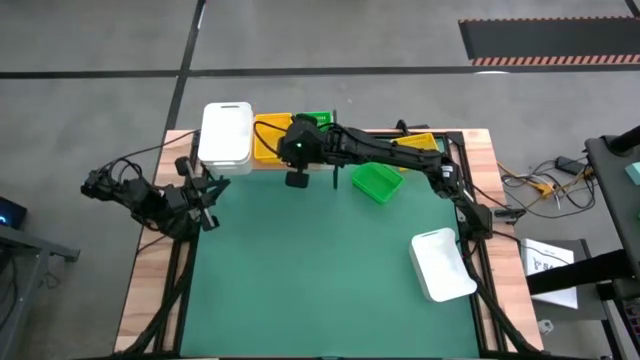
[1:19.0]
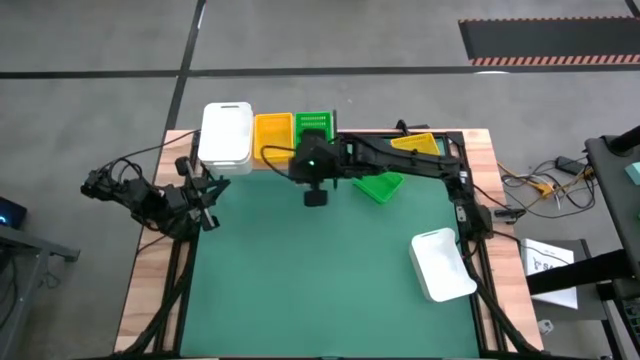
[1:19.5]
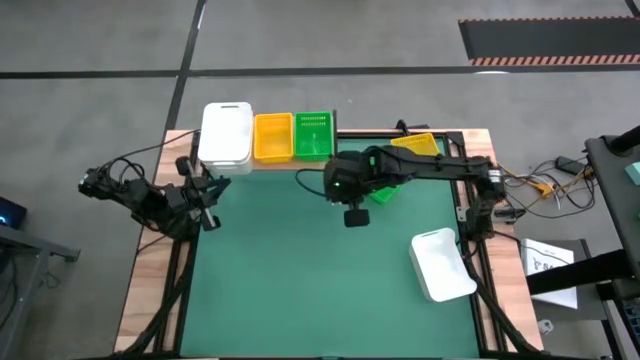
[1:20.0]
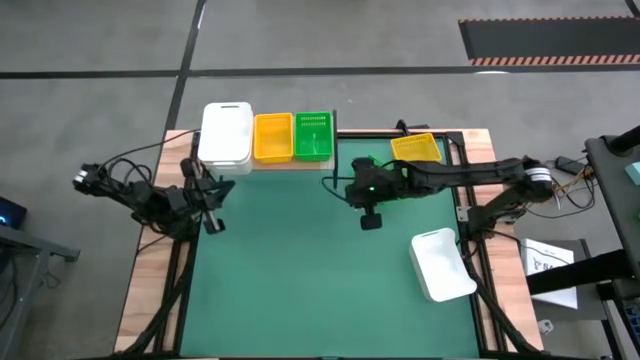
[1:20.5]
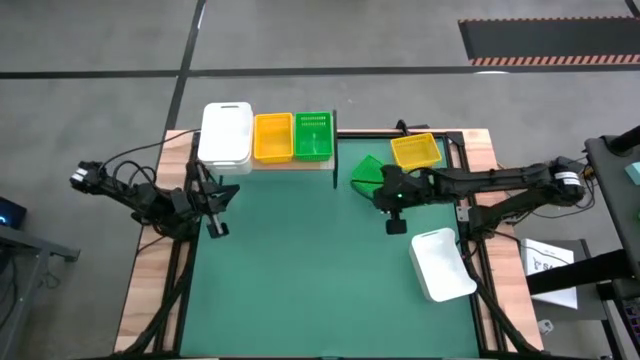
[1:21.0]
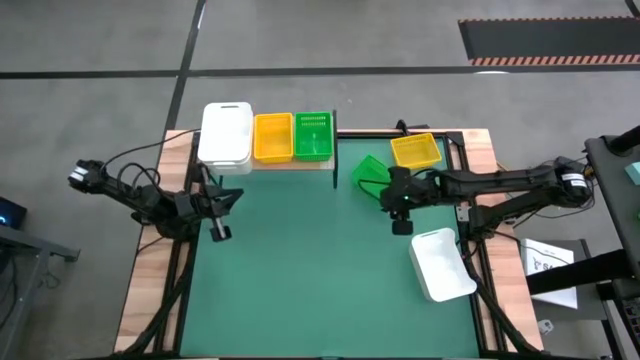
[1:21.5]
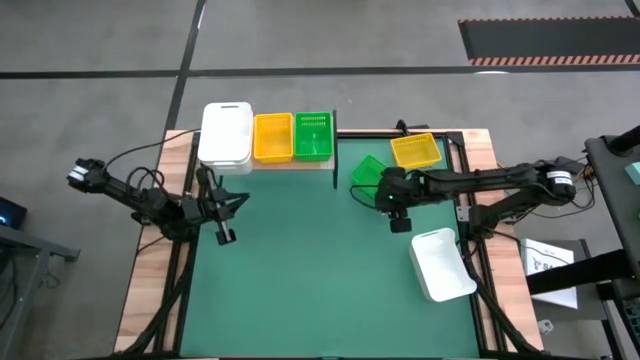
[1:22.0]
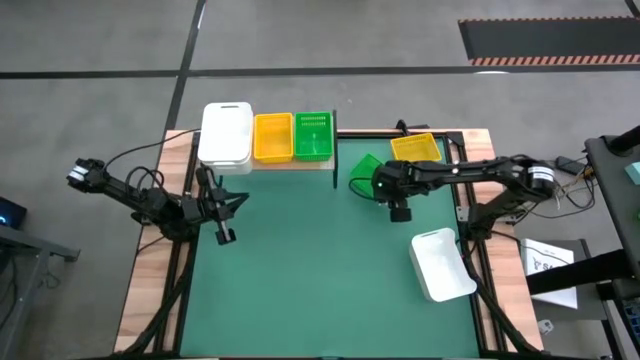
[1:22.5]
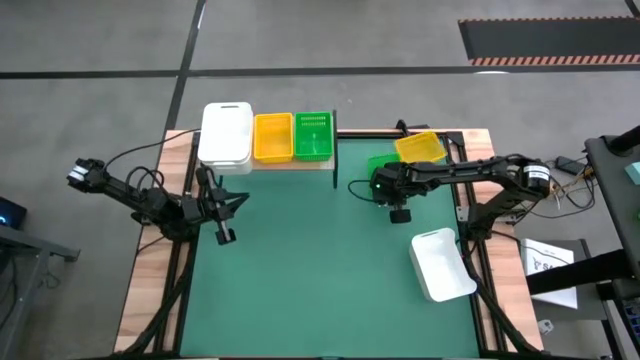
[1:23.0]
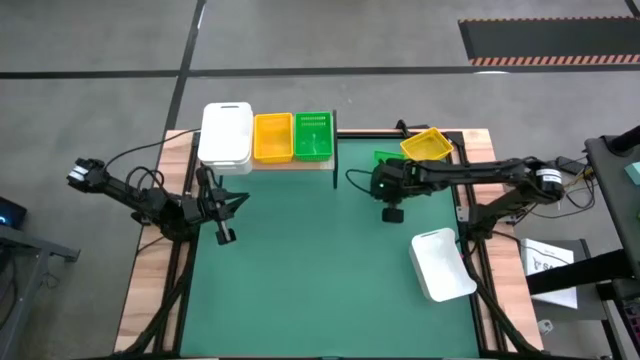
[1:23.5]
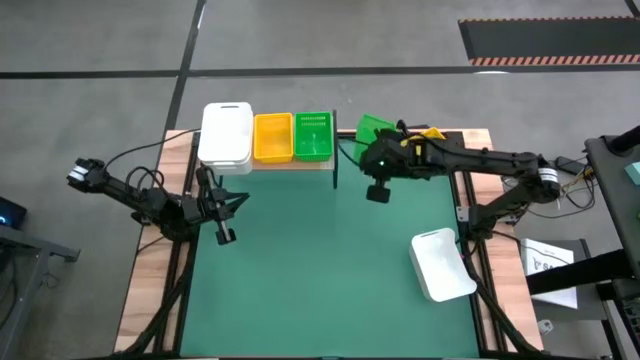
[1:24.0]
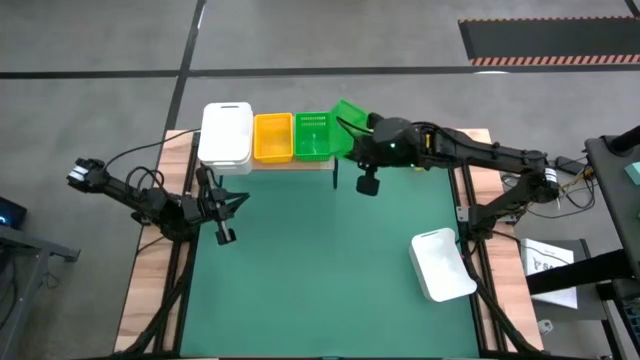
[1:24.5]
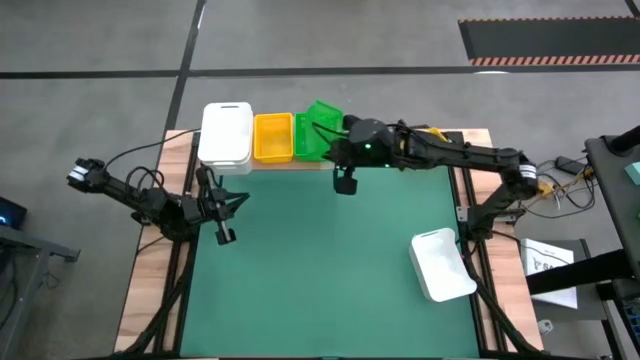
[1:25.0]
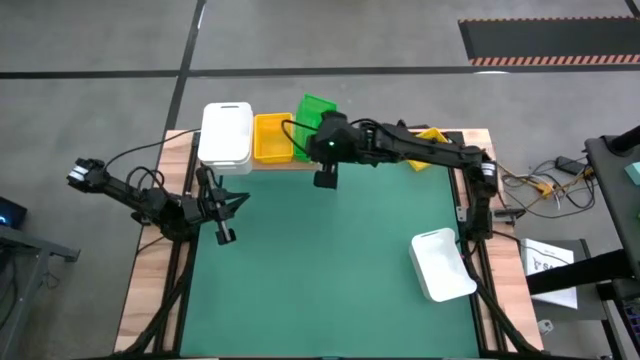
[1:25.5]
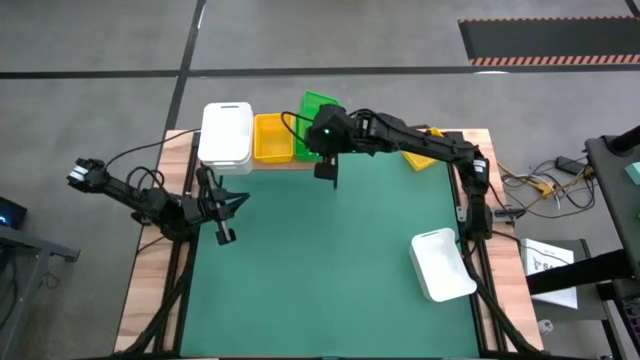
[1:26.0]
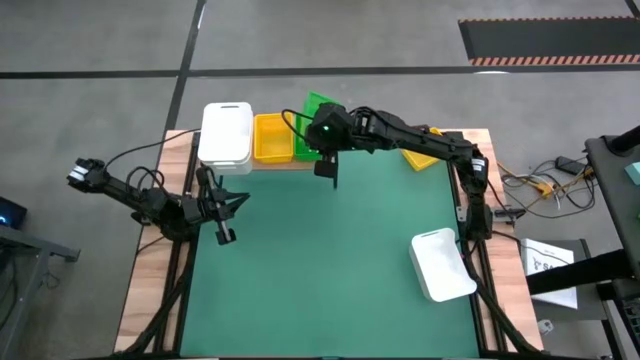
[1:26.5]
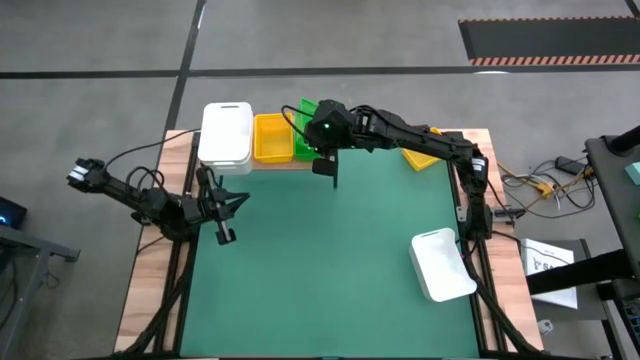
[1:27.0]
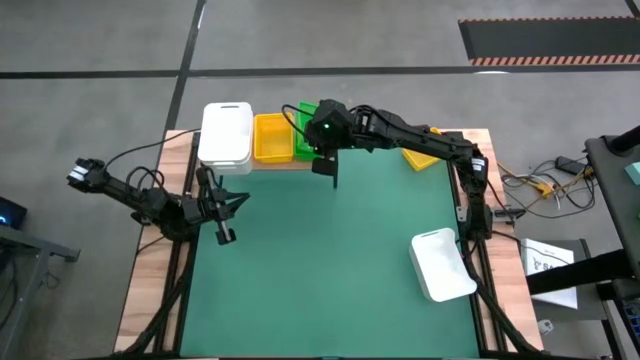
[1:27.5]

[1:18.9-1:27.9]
Stack the green basket on the green basket on the shelf

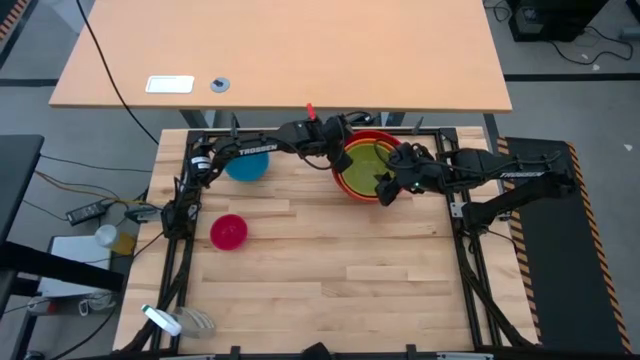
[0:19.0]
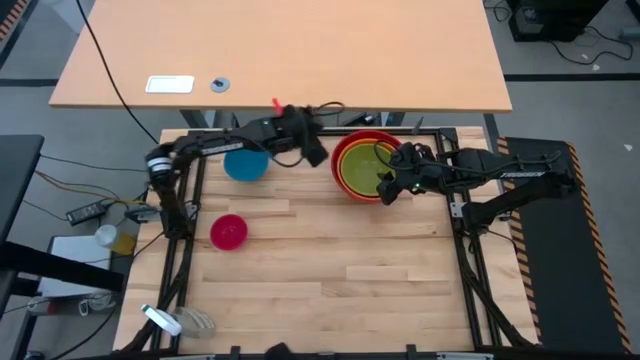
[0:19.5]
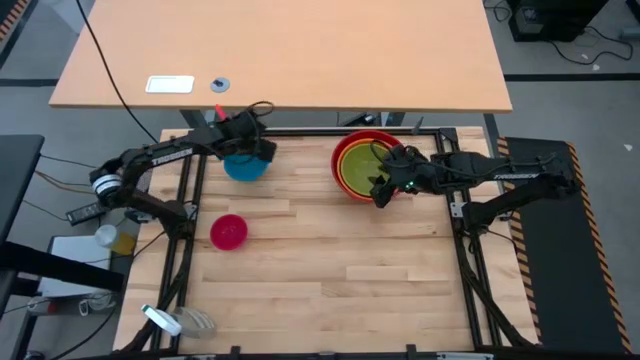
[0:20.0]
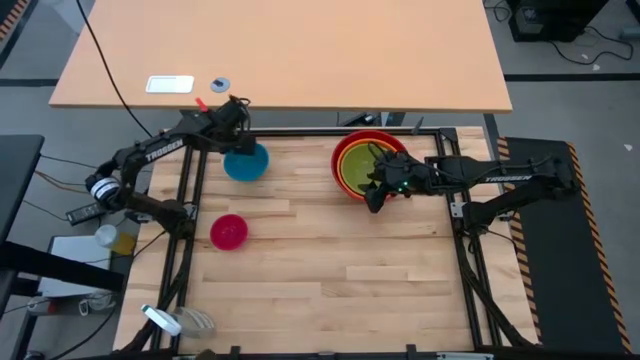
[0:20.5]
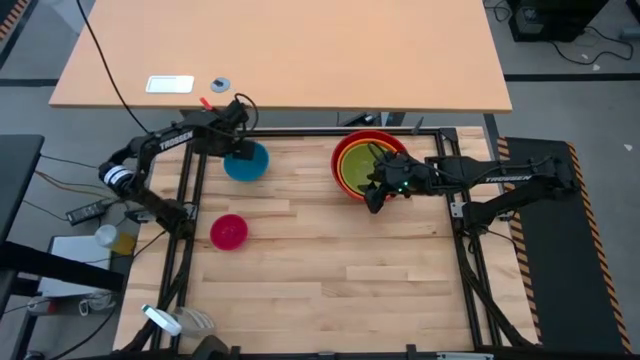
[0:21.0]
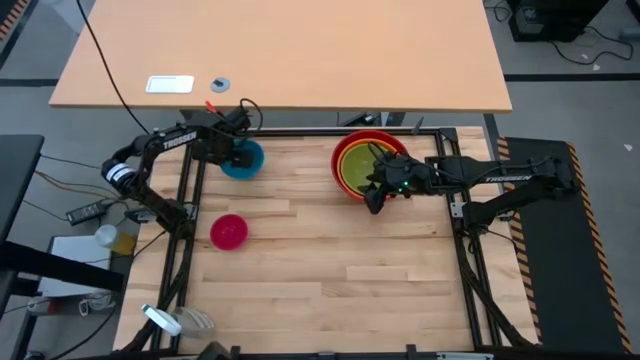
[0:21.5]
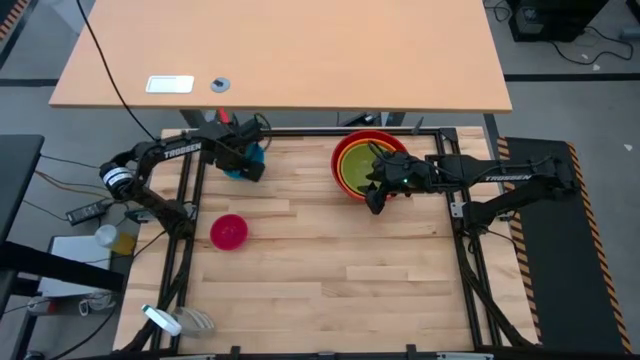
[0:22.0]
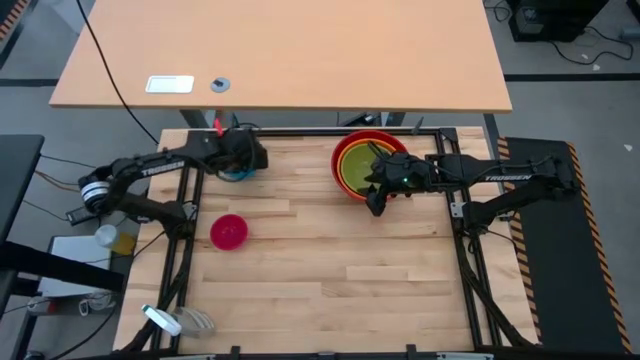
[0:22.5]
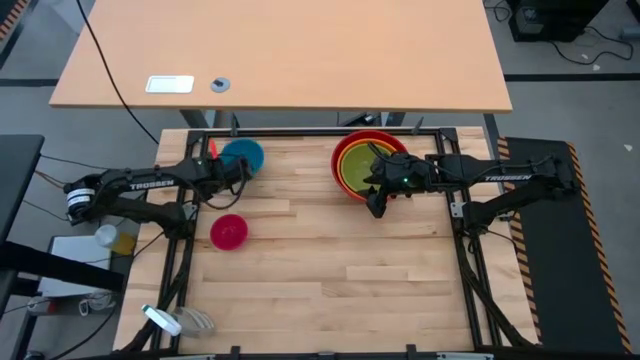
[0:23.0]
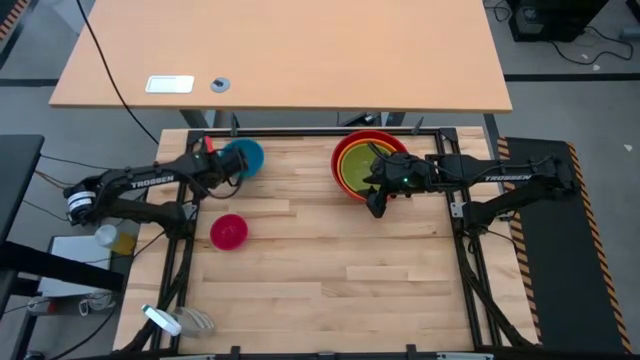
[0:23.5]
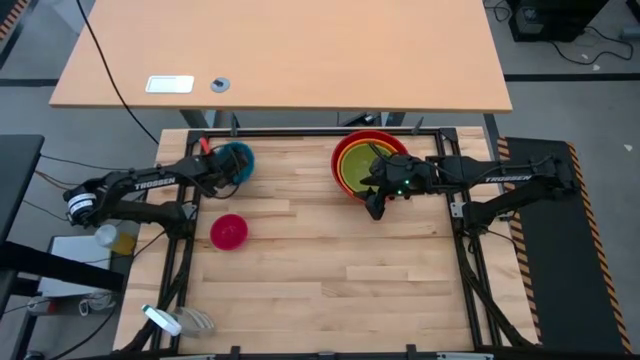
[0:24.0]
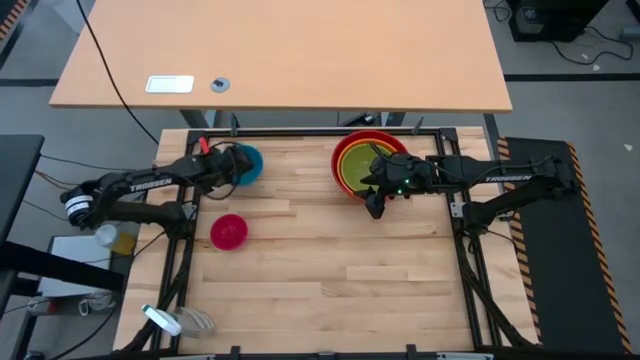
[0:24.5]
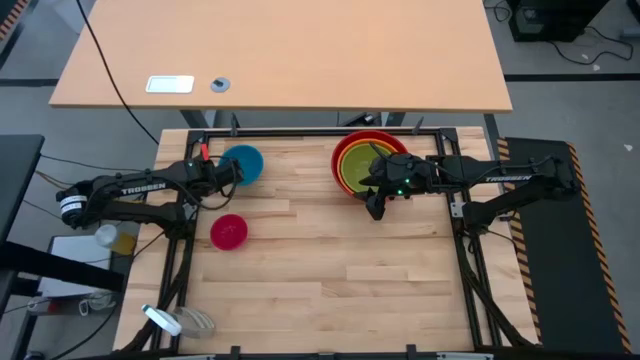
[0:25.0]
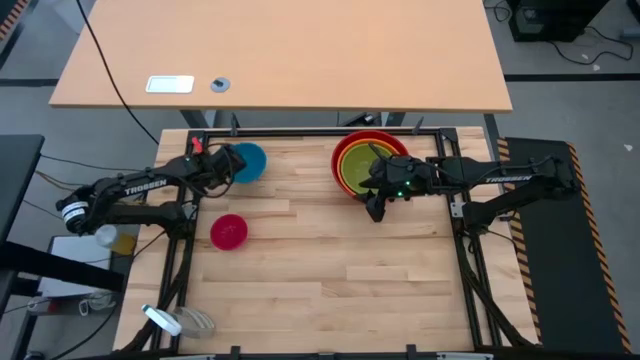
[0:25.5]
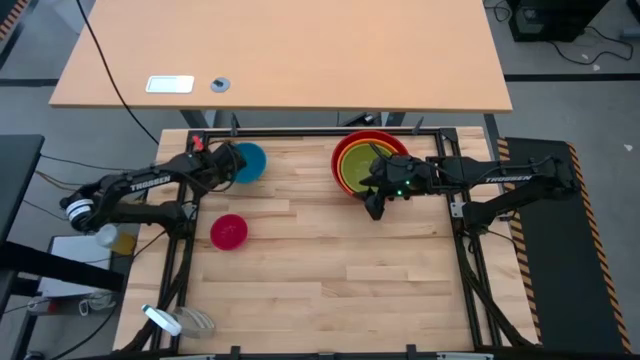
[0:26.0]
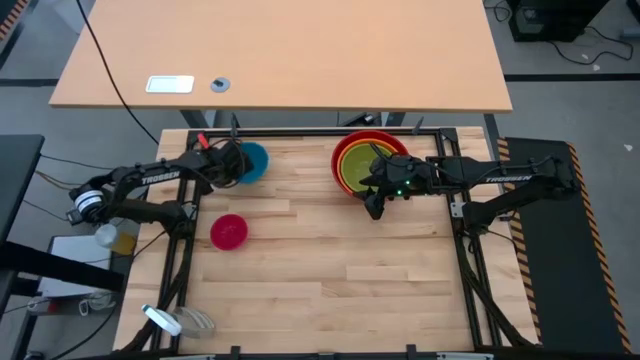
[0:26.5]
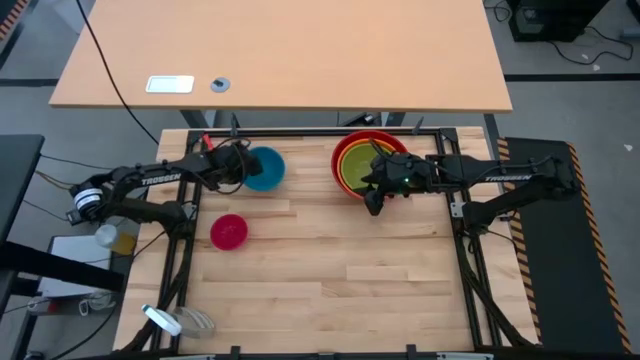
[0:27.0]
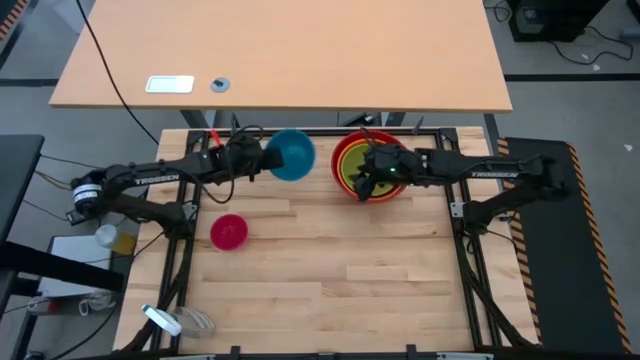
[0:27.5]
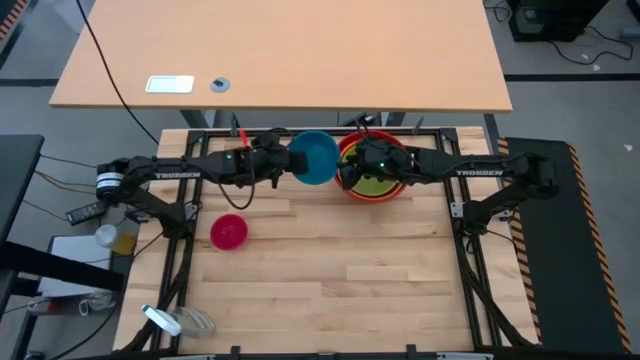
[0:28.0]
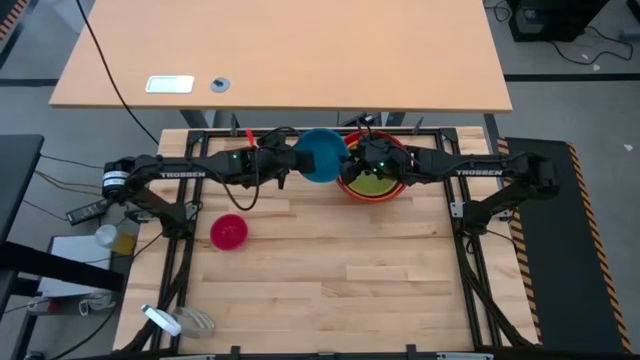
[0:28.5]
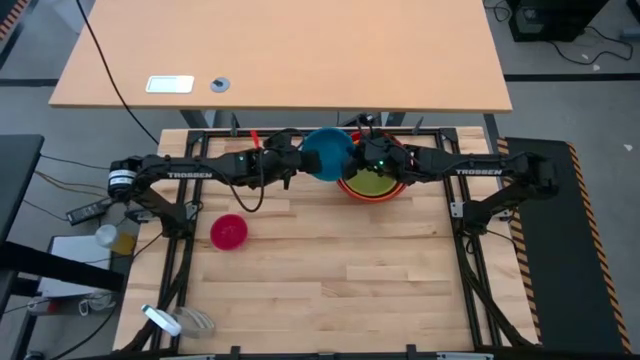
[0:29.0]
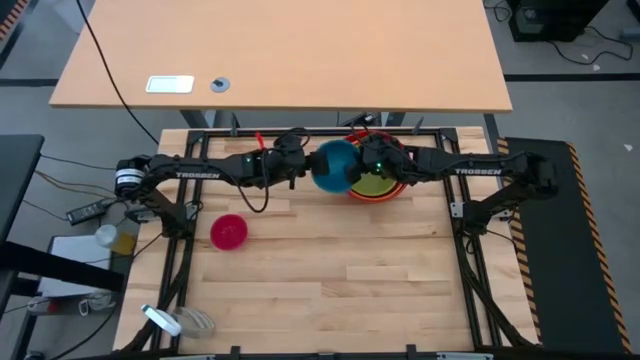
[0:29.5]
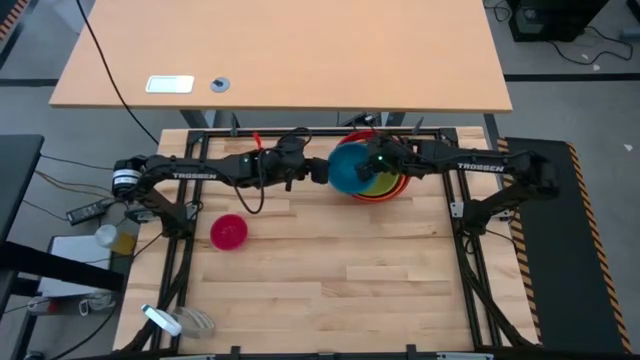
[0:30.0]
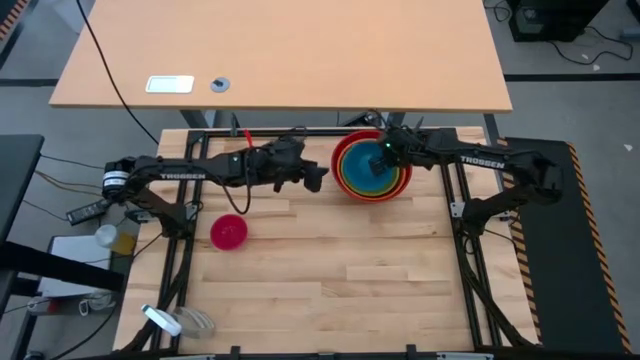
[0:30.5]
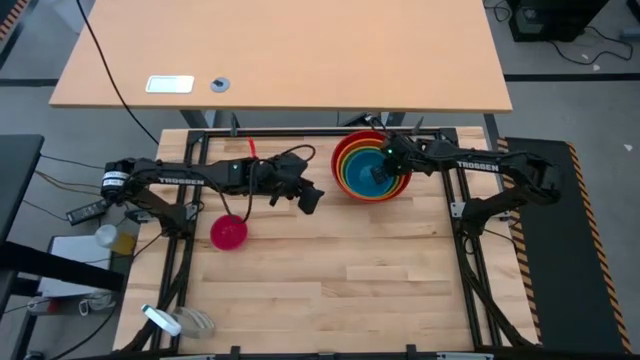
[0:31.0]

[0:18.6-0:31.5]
Stack the blue bowl on top of the green bowl
